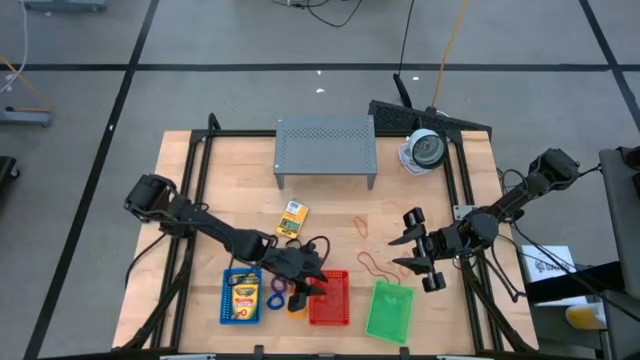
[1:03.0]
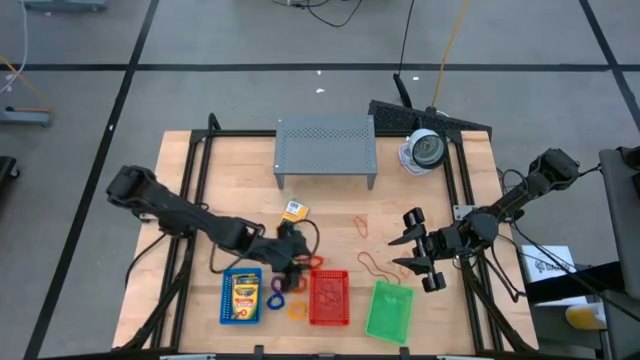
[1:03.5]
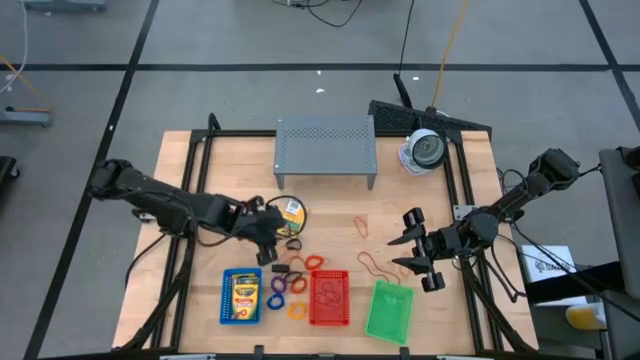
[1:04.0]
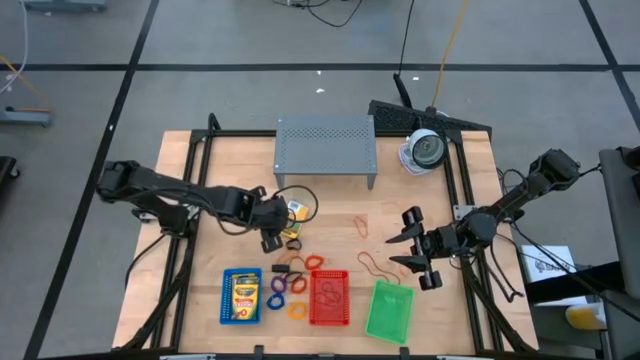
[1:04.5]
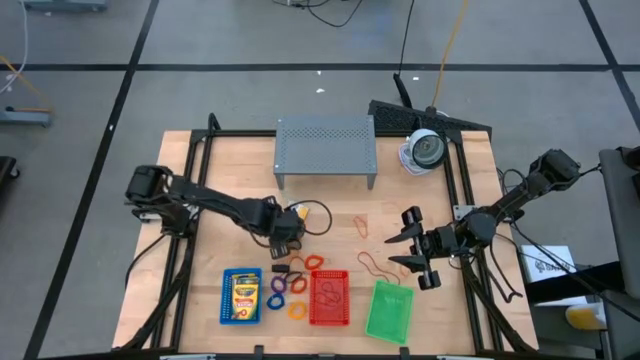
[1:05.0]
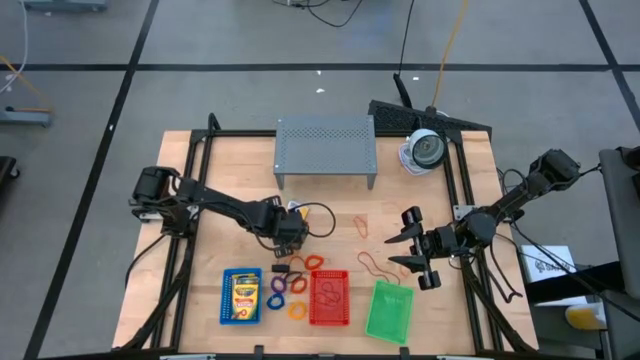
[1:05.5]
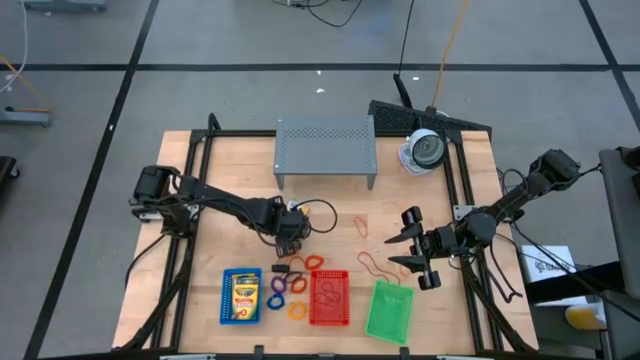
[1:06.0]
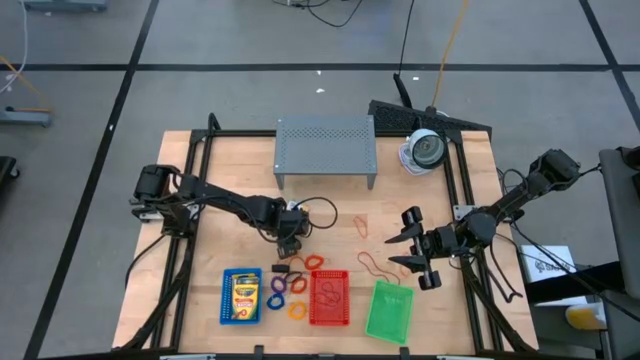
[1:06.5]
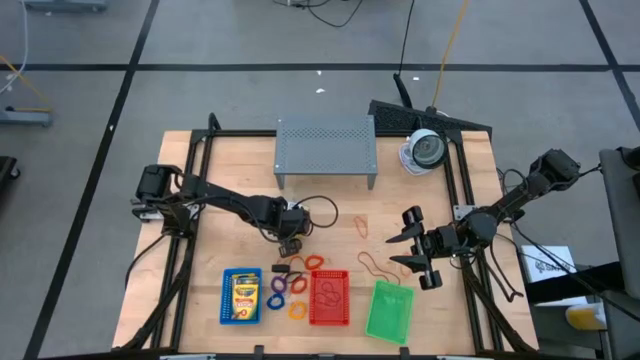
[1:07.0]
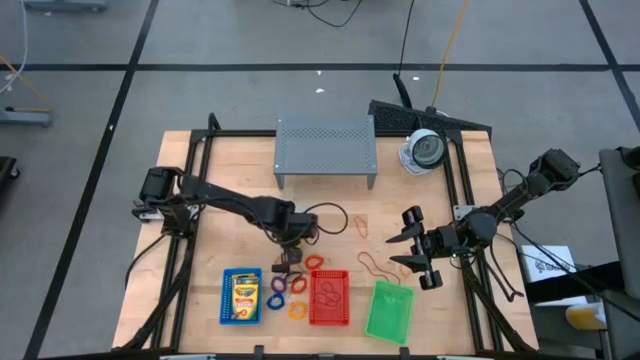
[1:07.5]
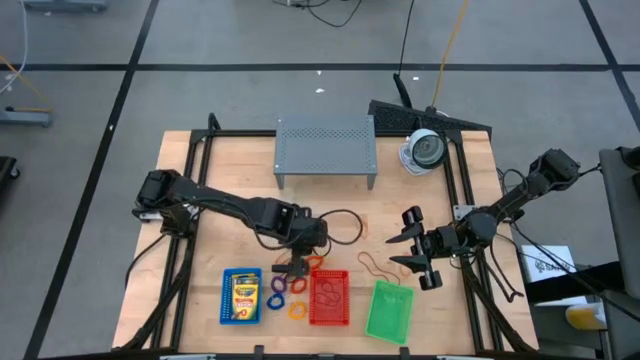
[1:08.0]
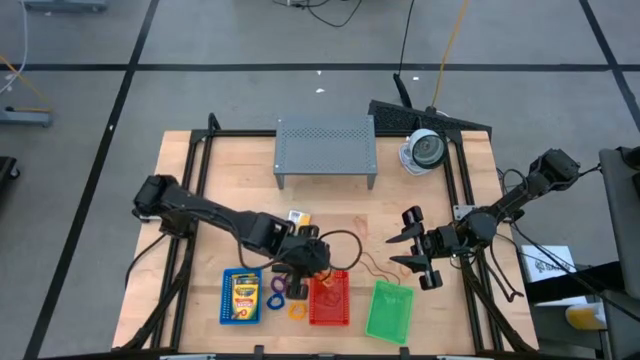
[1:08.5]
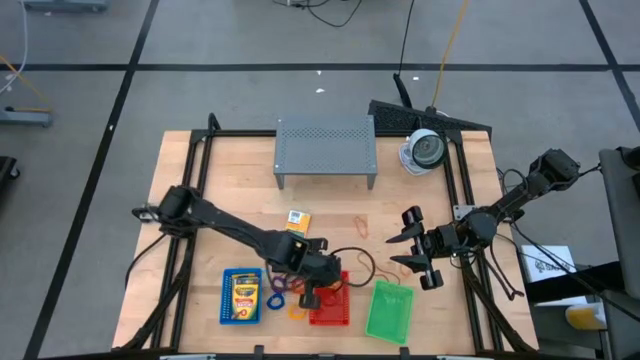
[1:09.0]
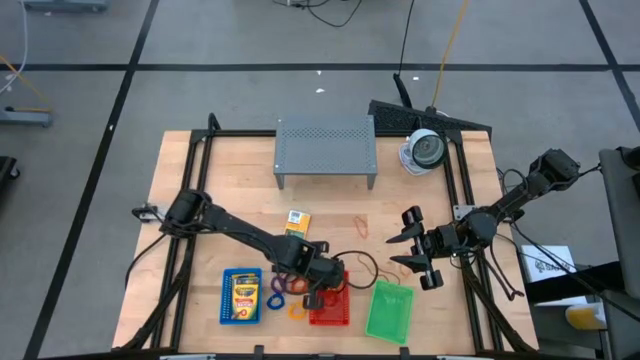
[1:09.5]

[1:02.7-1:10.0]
Task: Pick & Place Office Desk Supplies
Put the yellow rubber band into the red bin

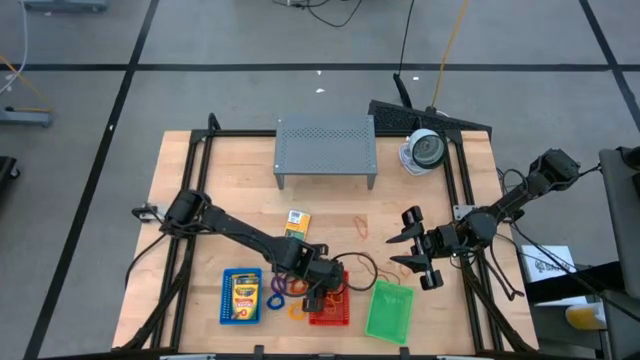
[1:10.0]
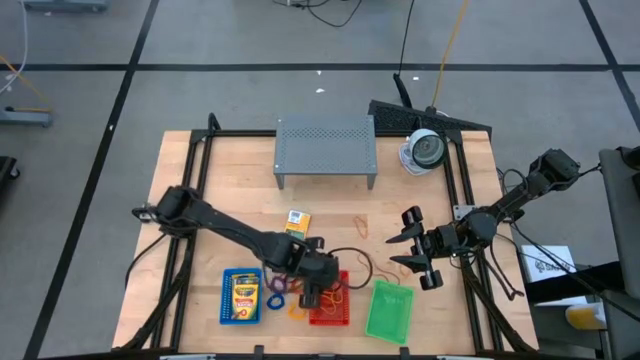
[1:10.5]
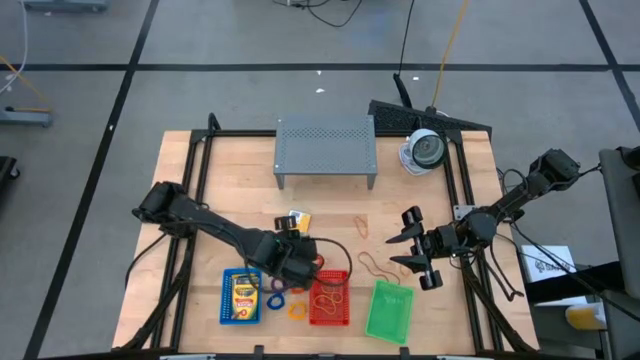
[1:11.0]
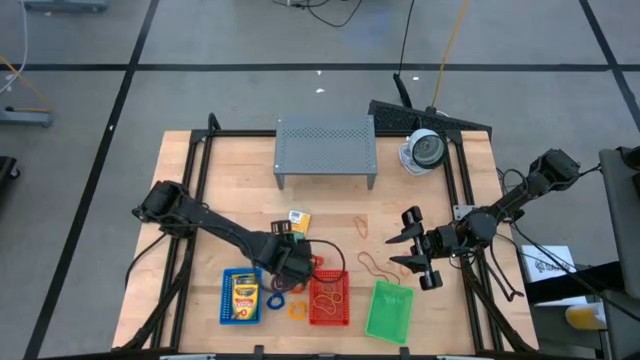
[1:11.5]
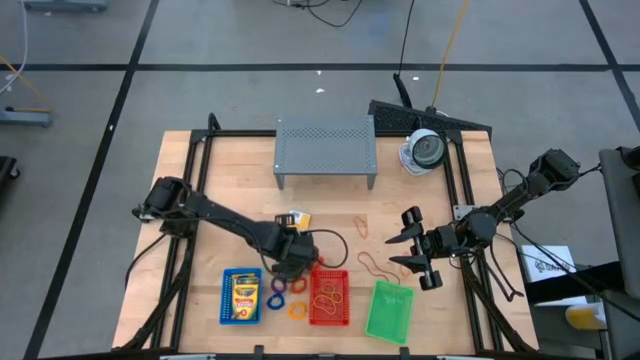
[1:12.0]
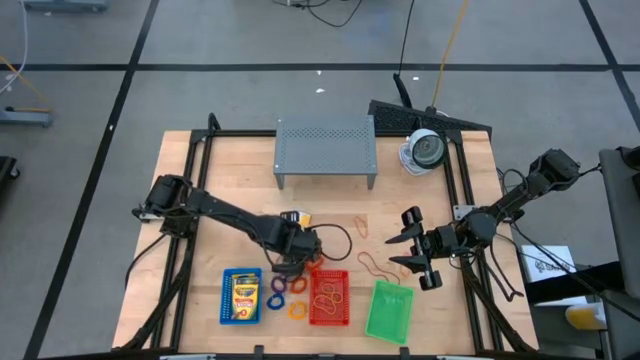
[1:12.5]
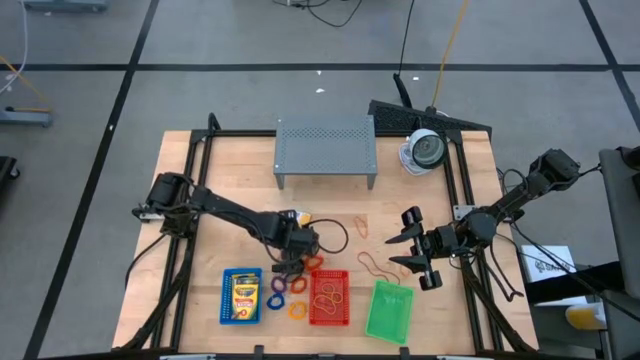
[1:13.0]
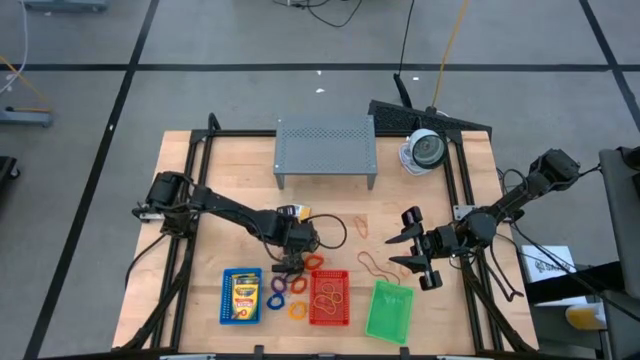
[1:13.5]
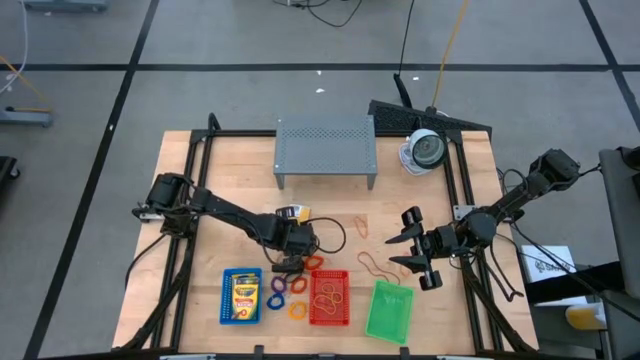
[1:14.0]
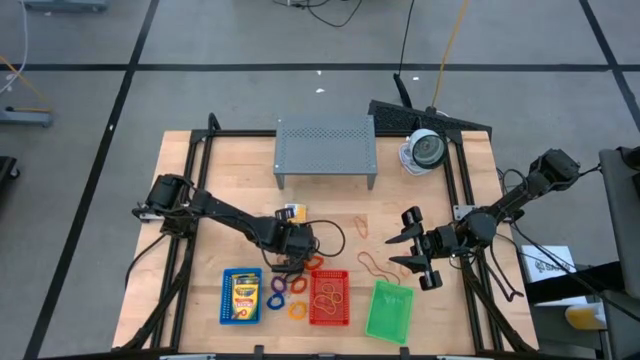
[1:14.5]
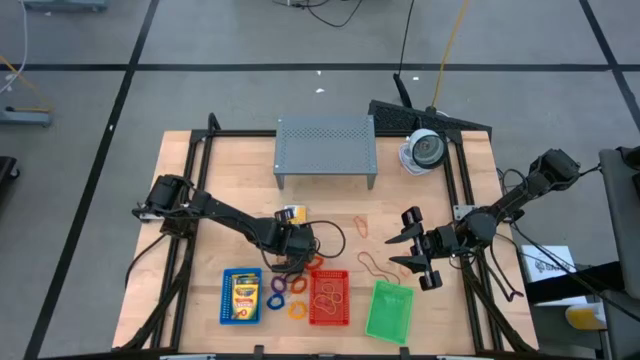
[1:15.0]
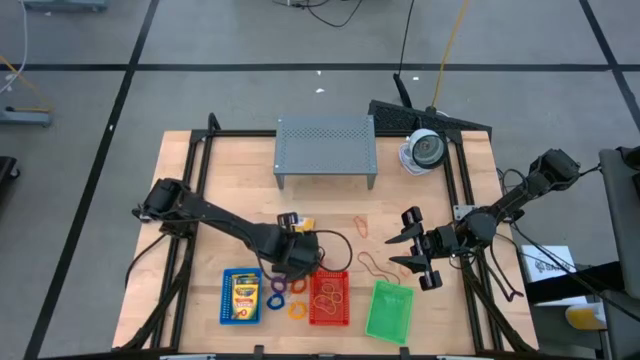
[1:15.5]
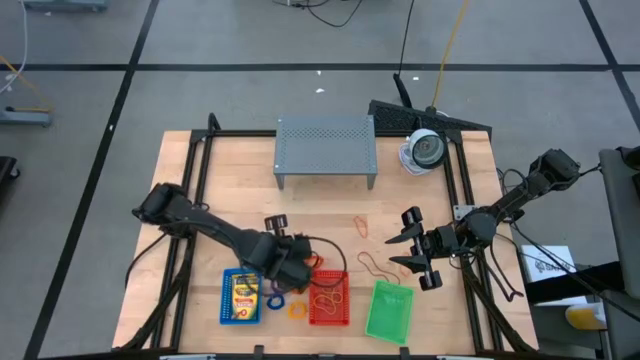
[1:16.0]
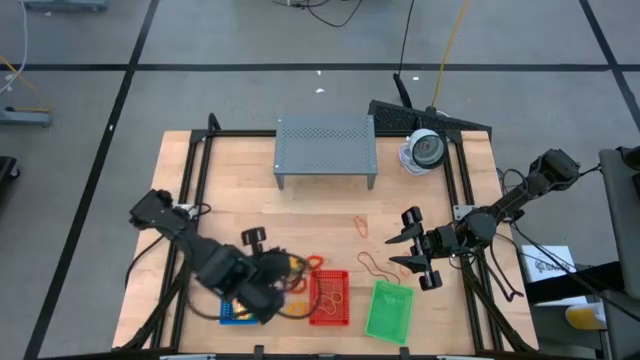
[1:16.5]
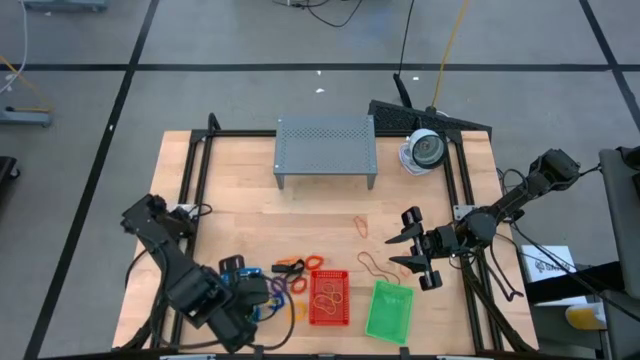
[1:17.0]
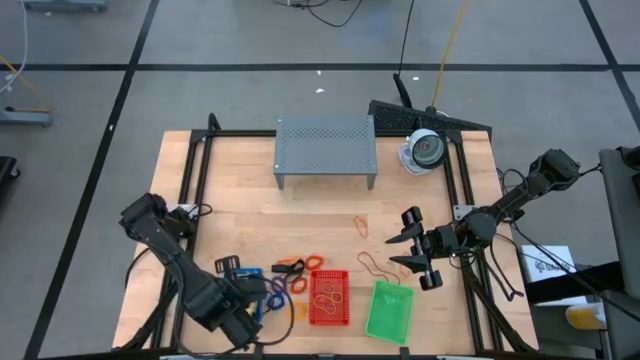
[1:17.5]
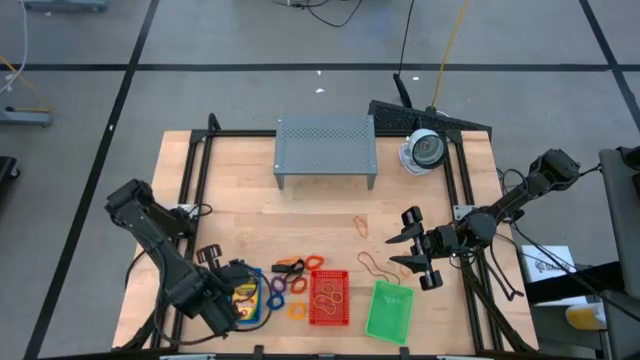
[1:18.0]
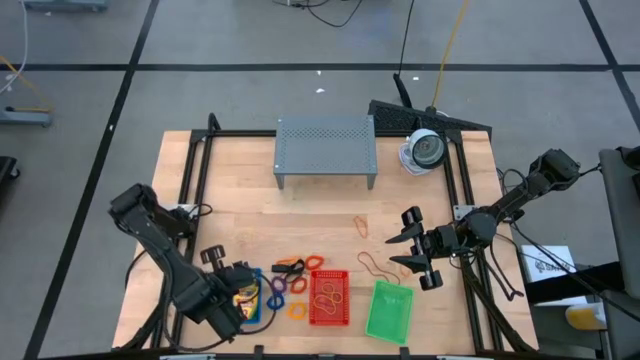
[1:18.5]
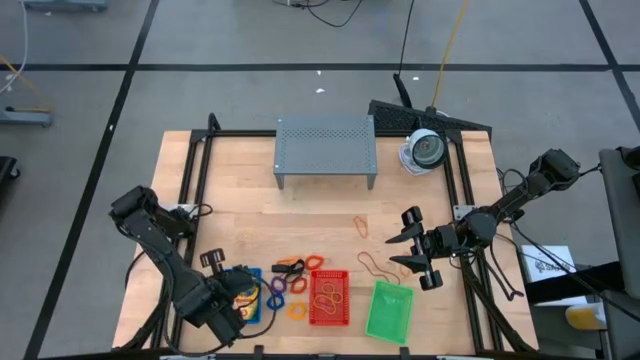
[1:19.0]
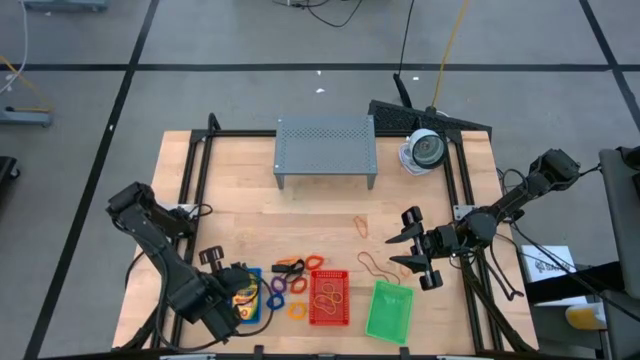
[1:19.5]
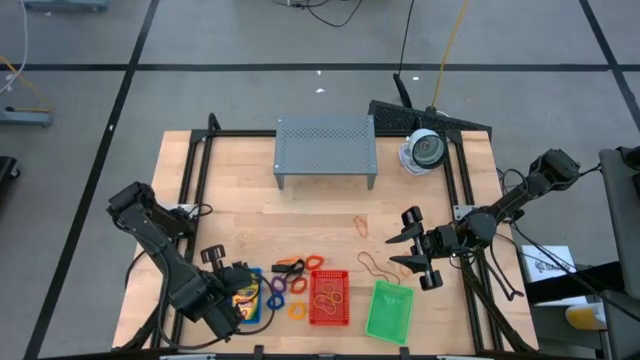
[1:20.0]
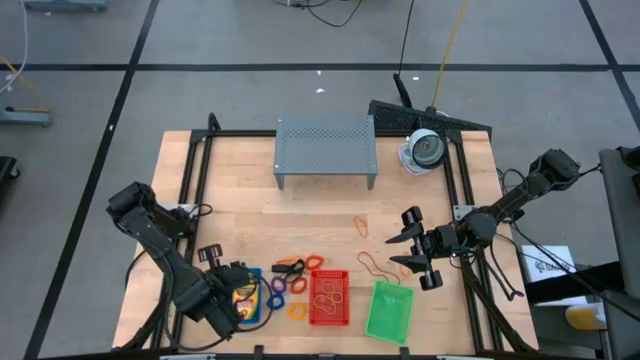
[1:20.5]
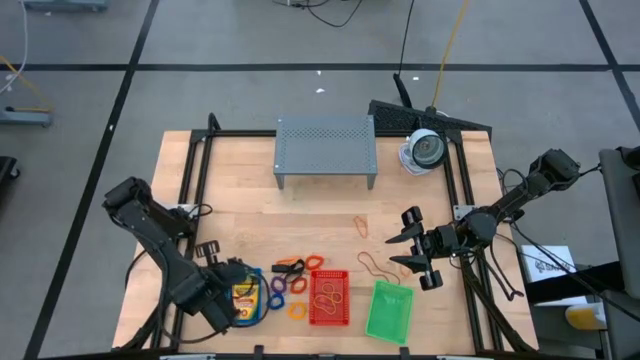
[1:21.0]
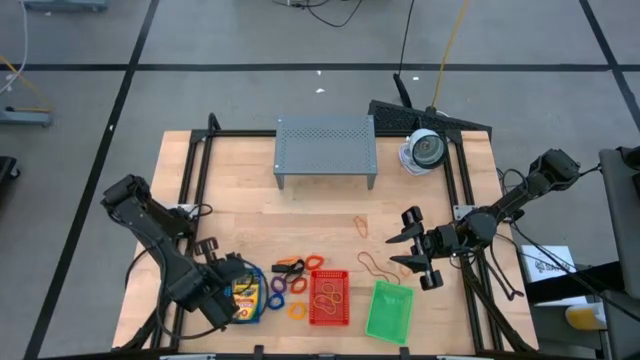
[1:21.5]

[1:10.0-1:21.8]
Put the crayon box into the blue bin

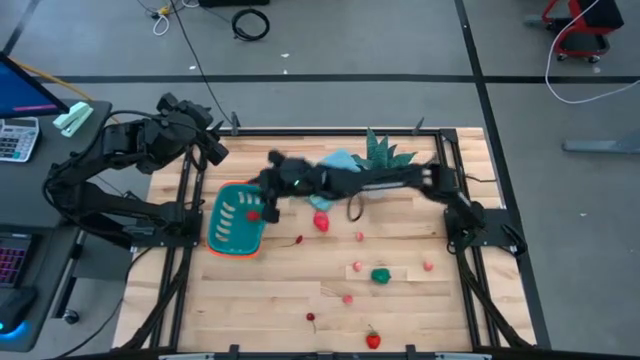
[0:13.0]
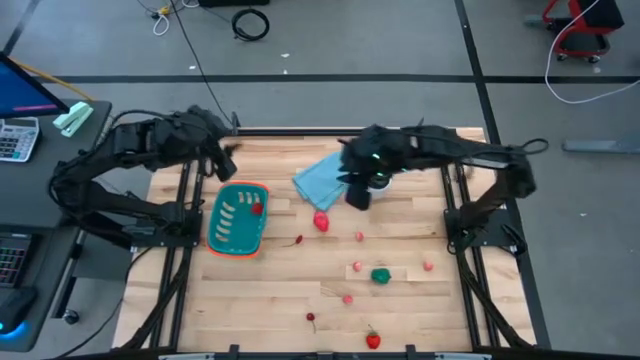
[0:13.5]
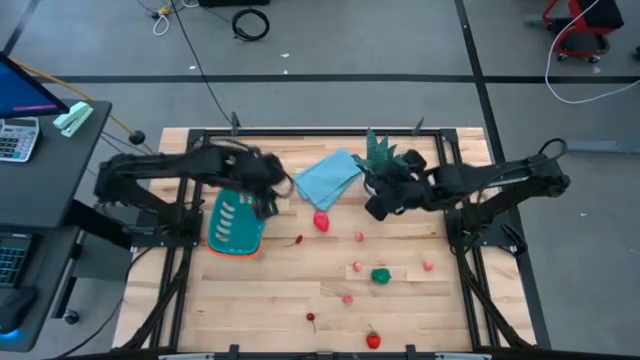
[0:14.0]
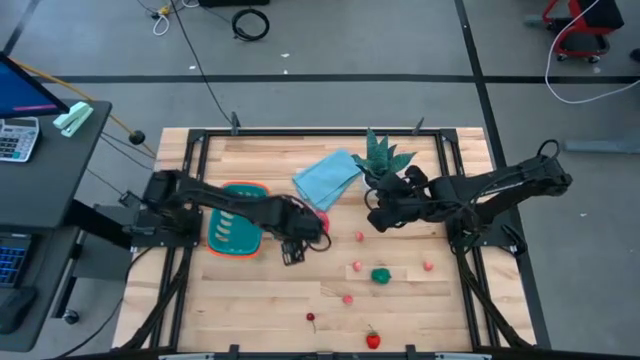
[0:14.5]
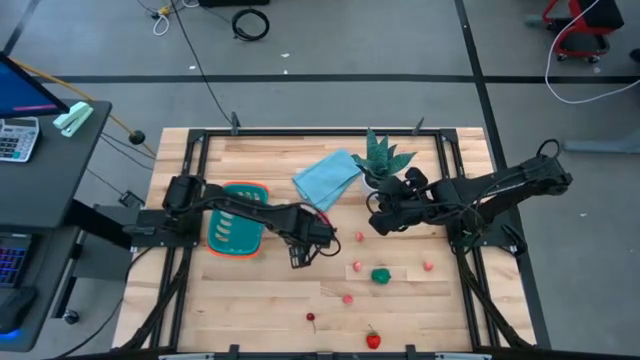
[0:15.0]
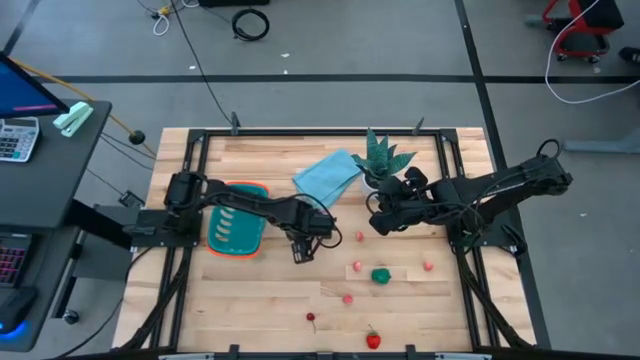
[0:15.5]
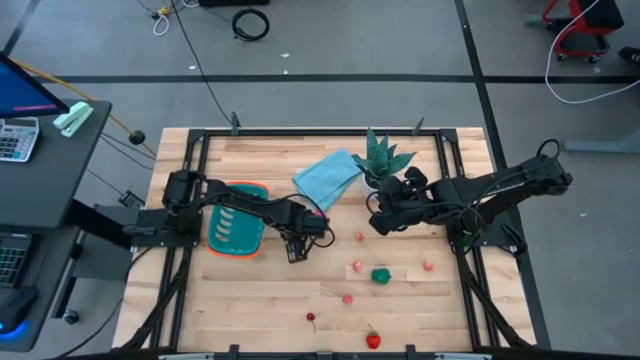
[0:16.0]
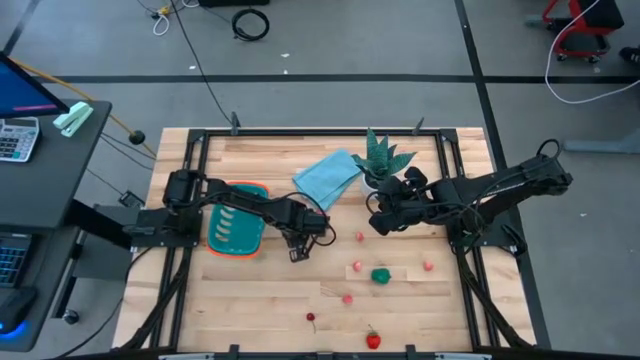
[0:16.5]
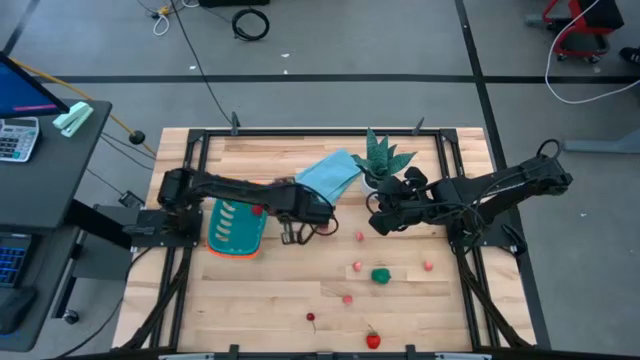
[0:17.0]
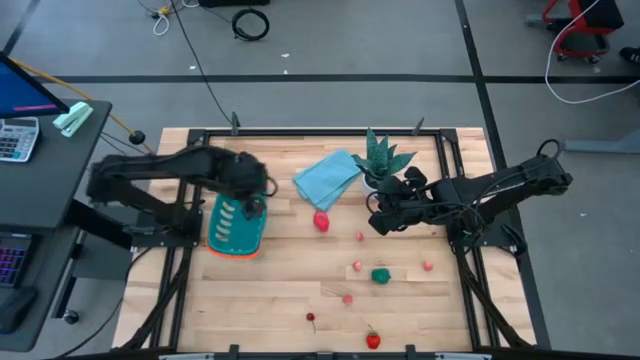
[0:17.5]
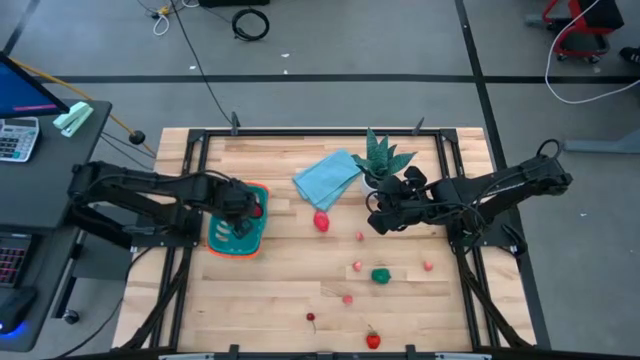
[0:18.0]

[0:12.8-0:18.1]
Task: Pick and placing Produce into tupperware
Put the top red cherry into the blue basket
